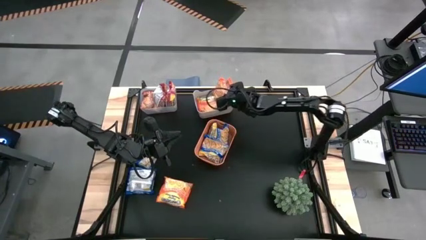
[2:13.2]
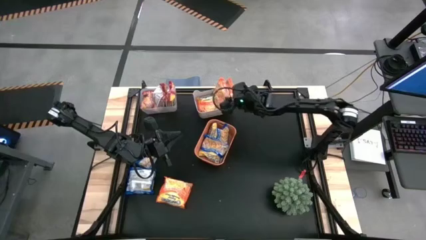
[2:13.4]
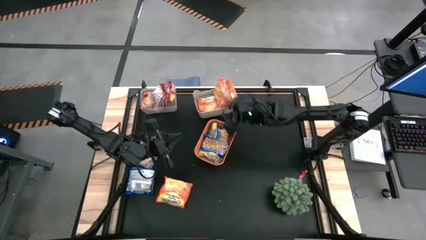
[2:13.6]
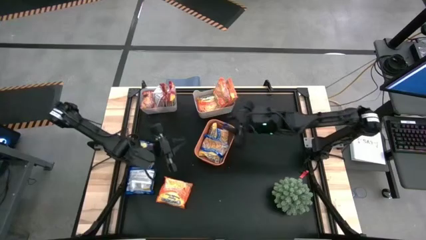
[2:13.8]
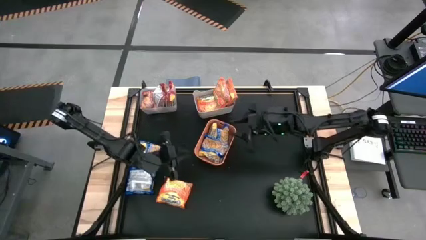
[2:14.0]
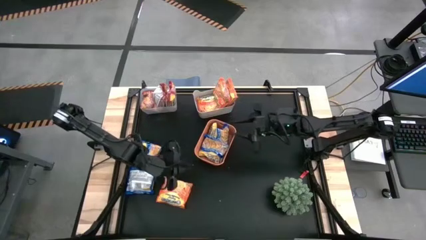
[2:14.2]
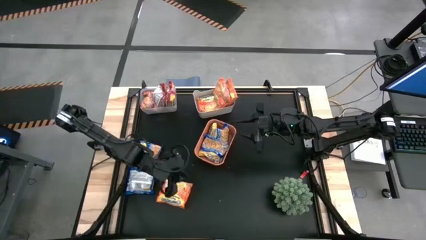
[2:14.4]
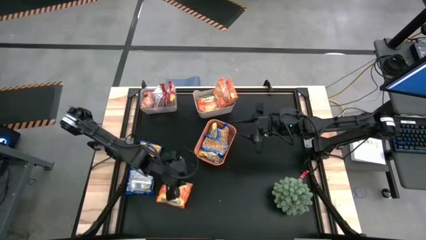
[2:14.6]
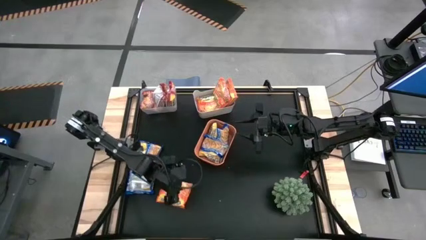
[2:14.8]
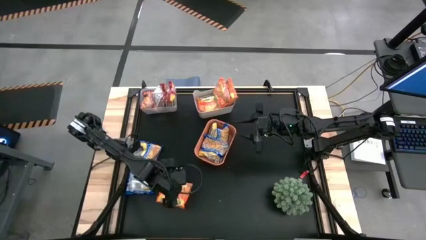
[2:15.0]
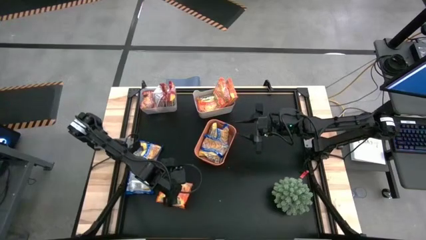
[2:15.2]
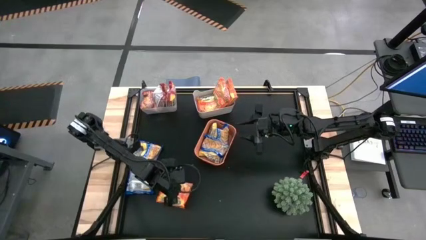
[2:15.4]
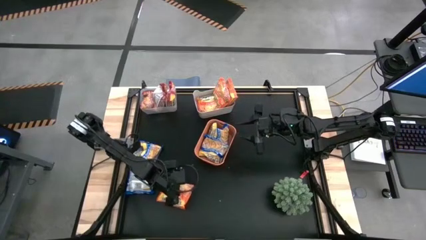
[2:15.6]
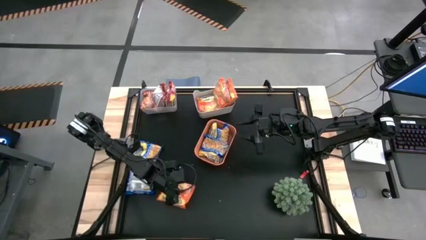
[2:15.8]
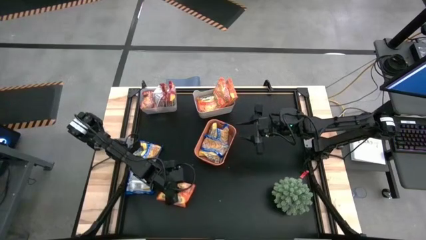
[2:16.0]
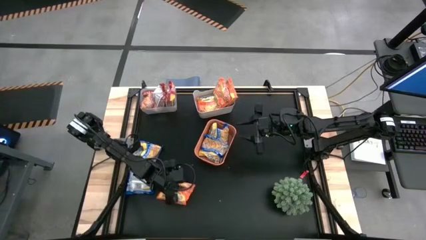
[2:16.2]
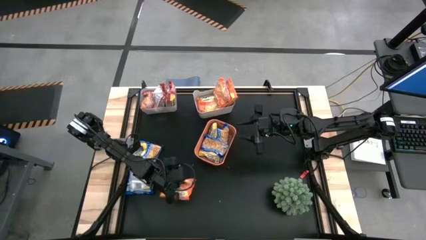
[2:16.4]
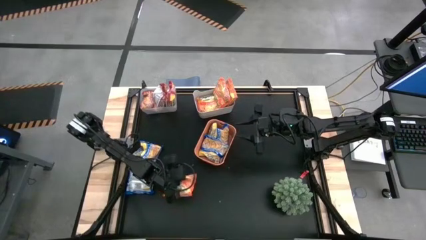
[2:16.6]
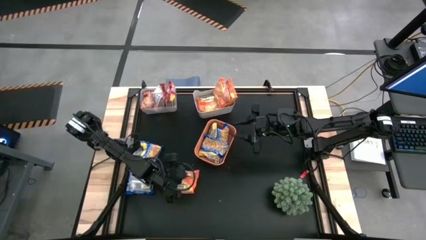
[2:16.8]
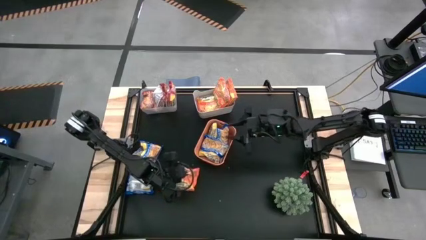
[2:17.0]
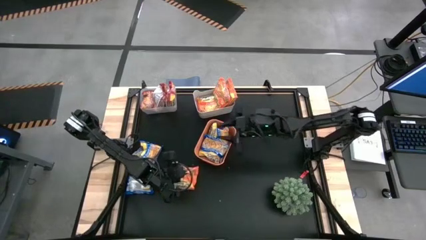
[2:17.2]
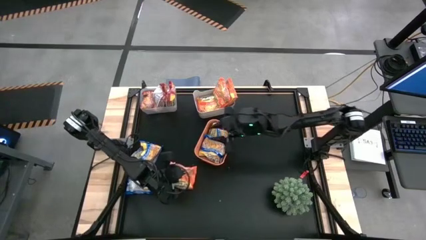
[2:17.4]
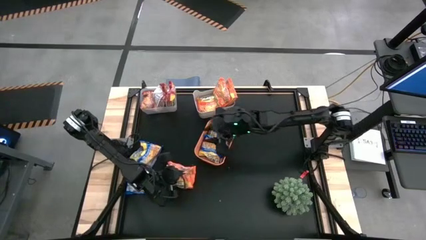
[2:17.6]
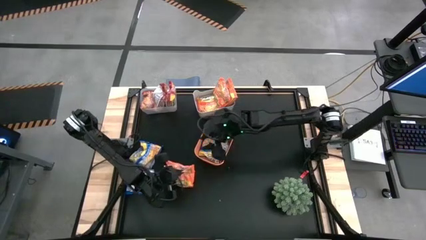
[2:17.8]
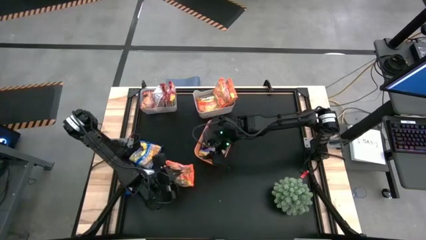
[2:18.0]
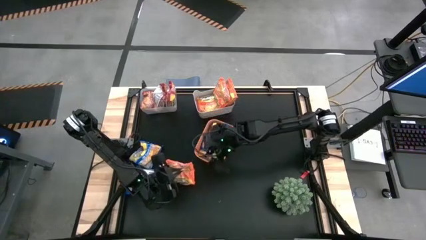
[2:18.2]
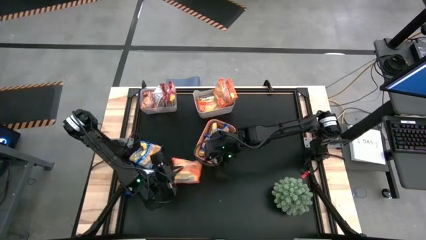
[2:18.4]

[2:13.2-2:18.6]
Task: Sort Maruchan noodles
Put the orange bag into the white bin

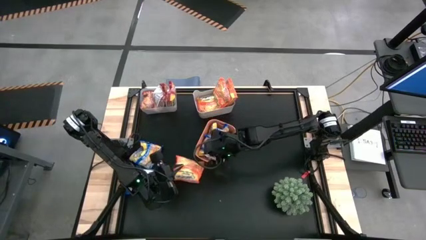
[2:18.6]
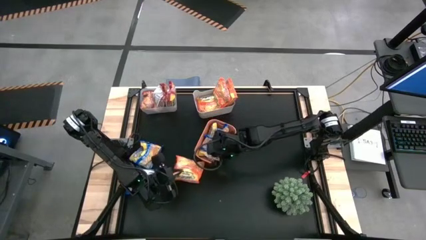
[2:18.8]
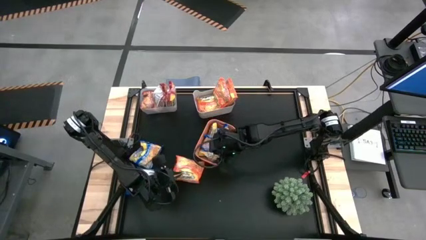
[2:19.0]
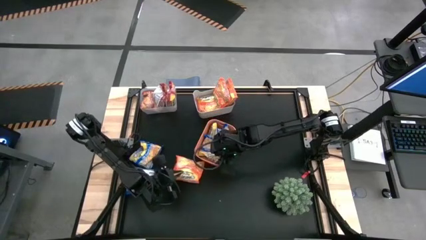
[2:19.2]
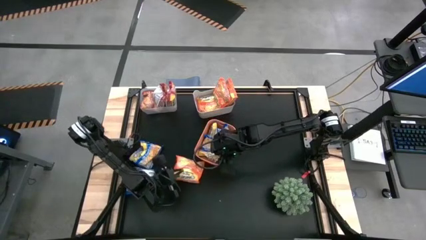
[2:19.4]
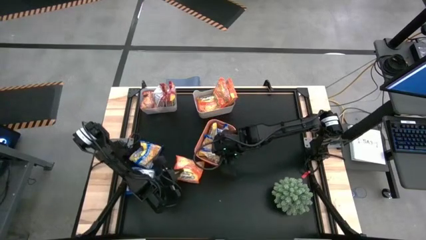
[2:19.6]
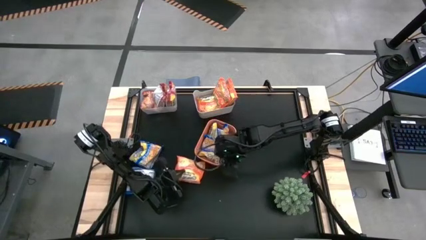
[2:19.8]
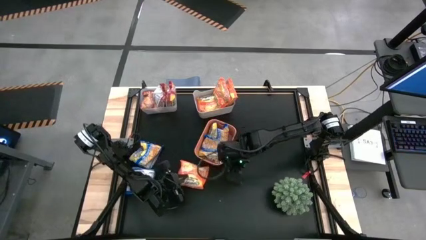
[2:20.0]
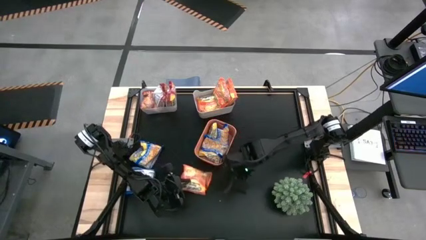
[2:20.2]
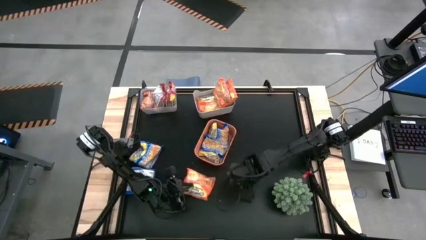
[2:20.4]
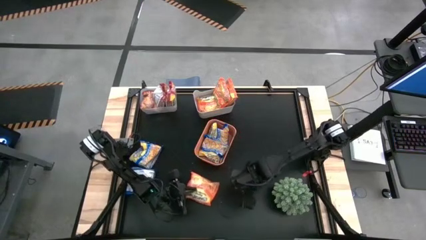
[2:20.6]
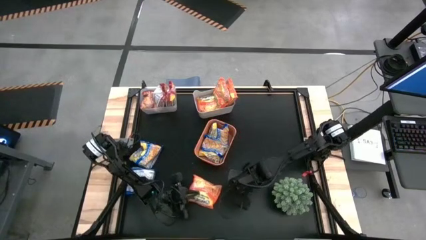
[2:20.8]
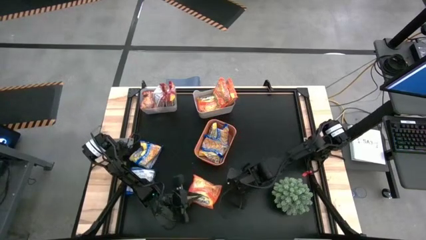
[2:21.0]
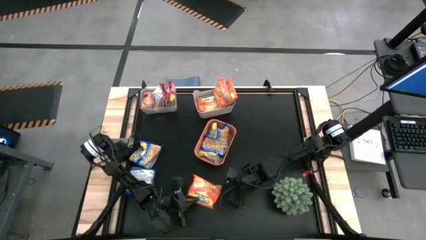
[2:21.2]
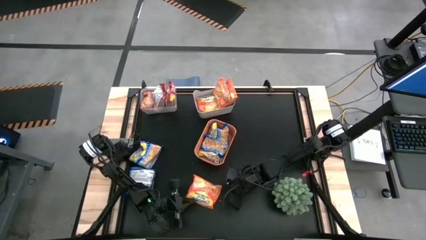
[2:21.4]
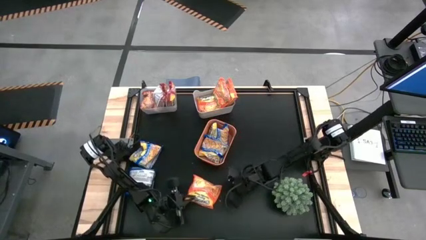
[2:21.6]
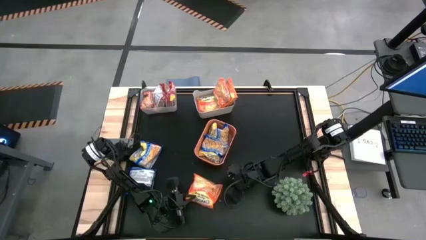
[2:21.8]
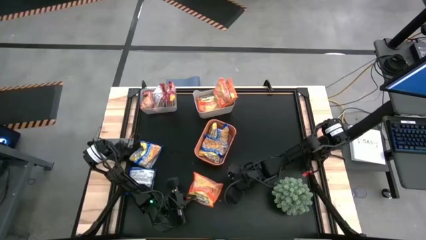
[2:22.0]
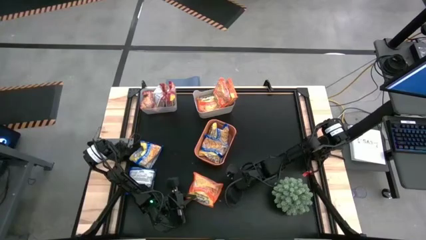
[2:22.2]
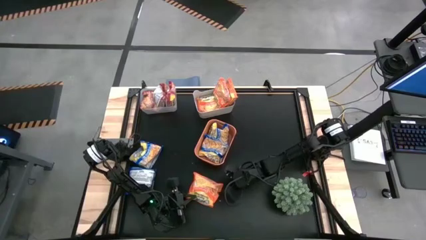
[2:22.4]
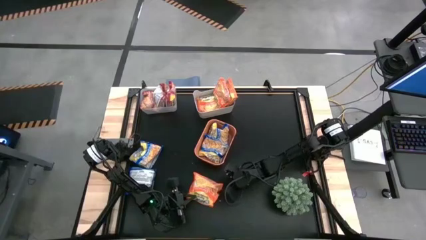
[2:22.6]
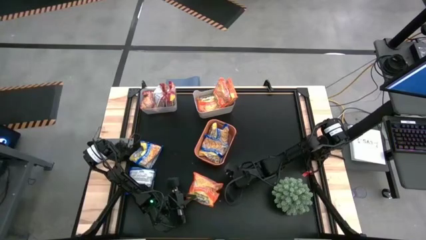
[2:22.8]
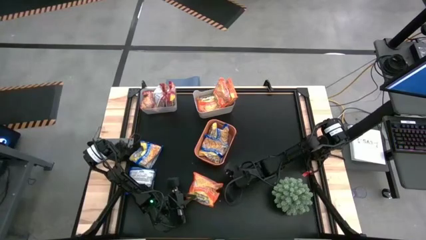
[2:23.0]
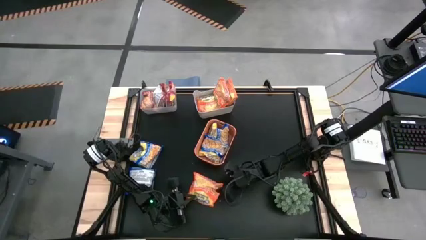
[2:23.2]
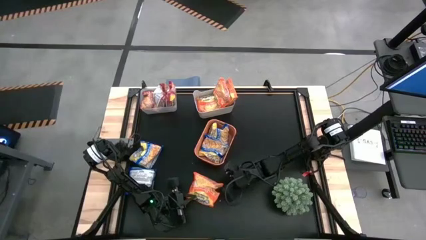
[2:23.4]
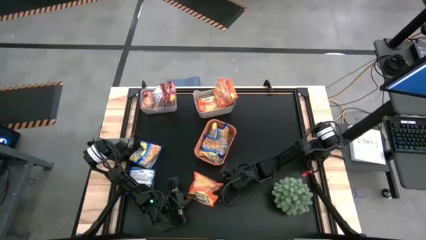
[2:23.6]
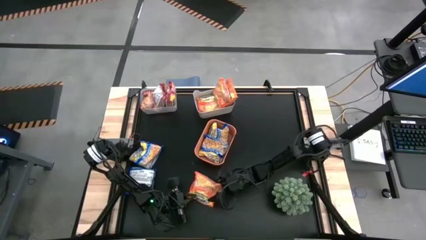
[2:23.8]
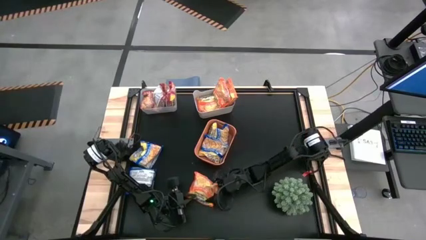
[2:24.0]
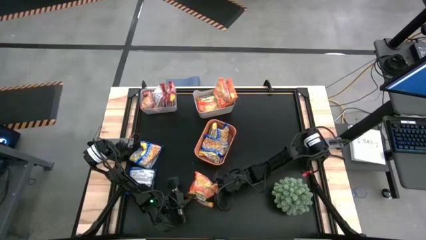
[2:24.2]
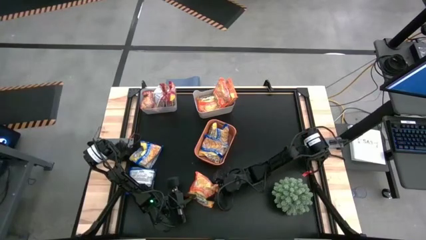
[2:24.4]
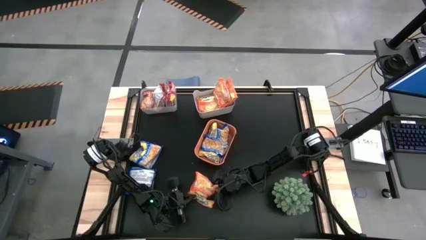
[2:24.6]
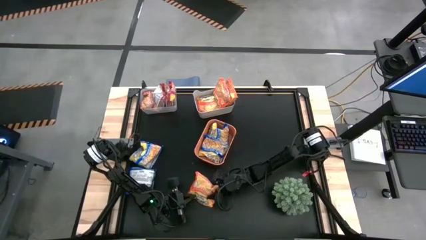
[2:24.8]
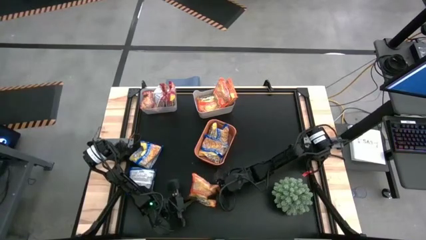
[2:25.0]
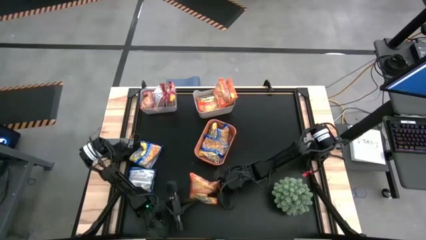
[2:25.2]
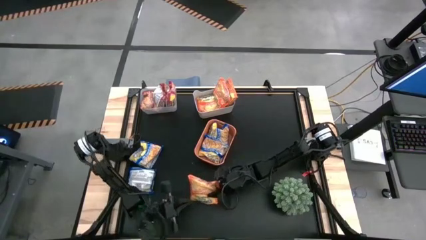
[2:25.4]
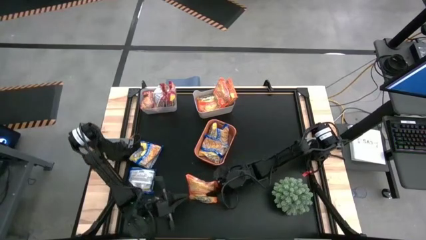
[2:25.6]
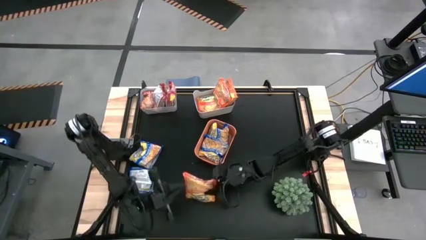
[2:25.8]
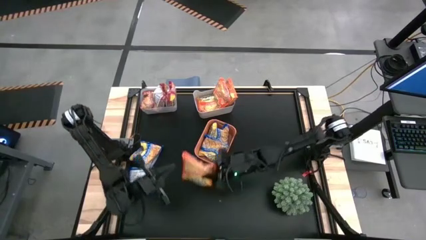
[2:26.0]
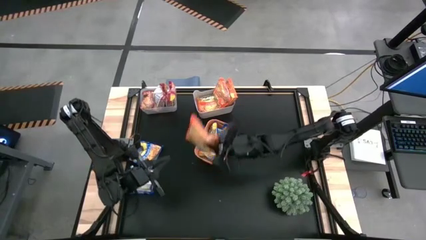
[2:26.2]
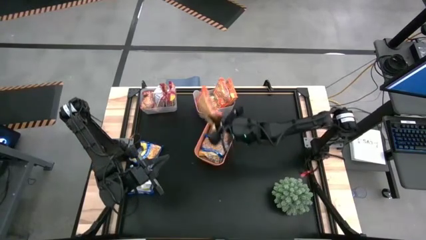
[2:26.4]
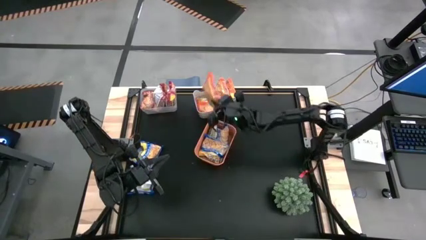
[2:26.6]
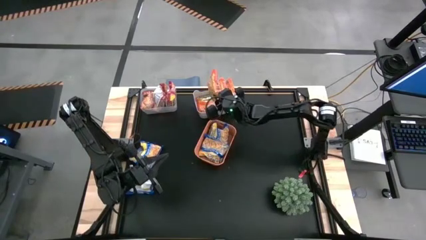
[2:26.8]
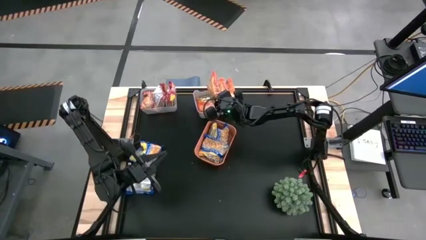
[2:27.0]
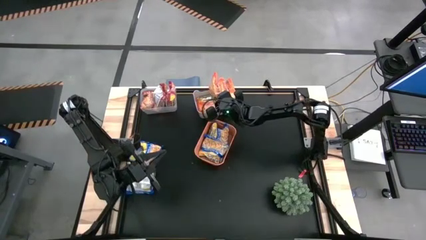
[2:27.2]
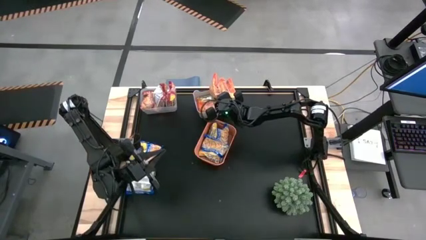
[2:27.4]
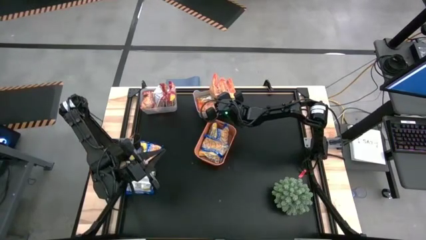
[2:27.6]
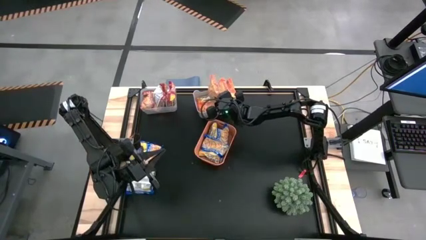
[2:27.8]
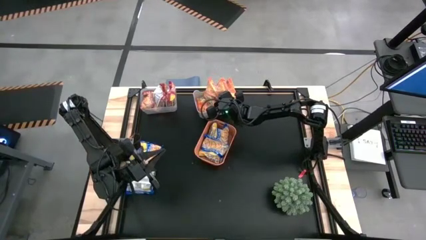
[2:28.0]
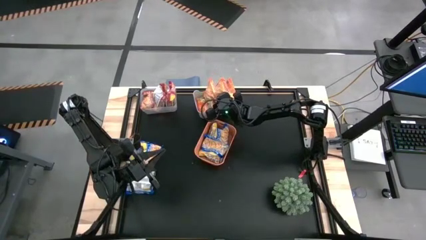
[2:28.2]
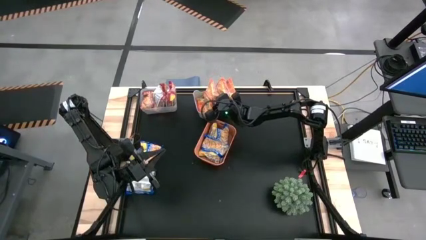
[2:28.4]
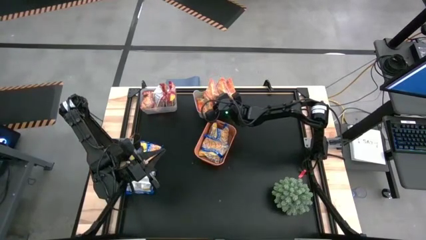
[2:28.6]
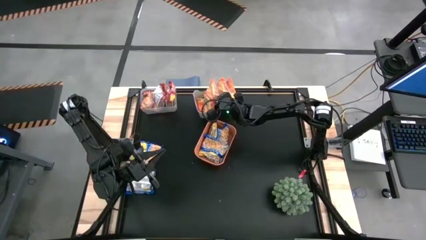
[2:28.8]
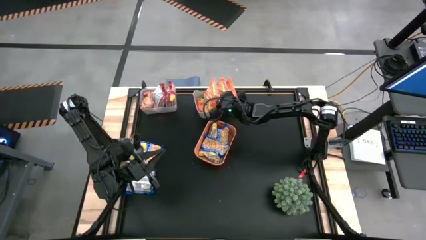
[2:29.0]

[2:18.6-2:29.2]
Put the orange bag into the white bin

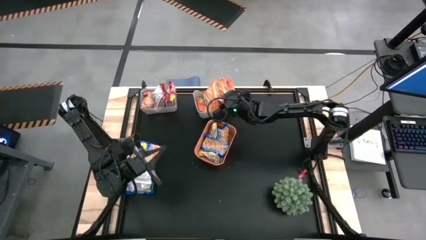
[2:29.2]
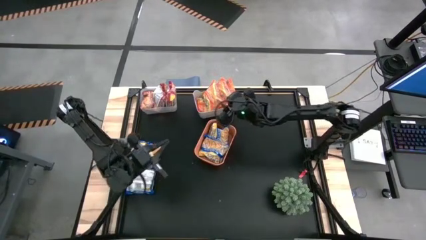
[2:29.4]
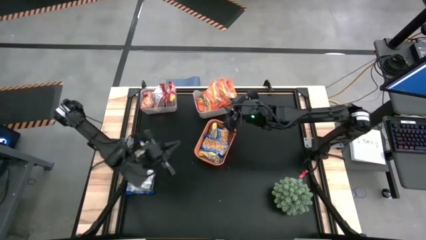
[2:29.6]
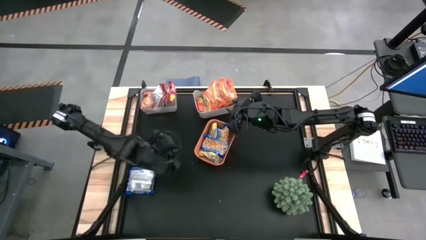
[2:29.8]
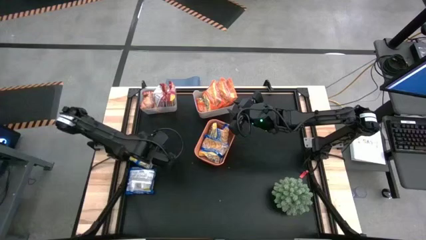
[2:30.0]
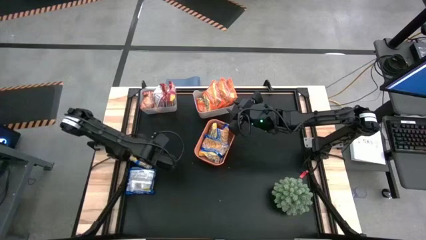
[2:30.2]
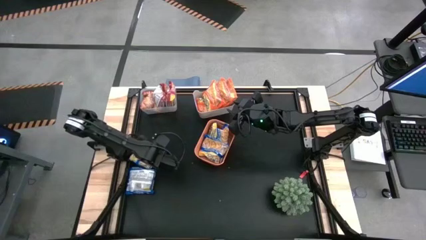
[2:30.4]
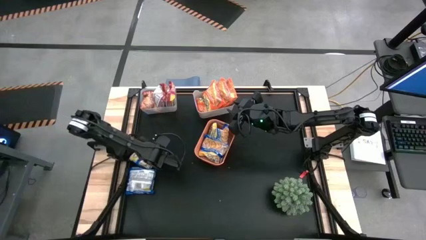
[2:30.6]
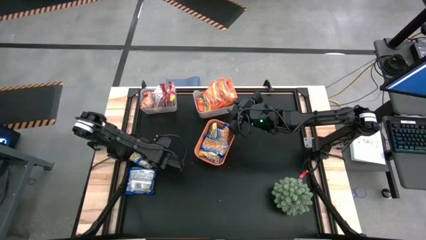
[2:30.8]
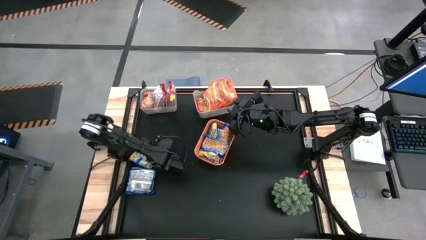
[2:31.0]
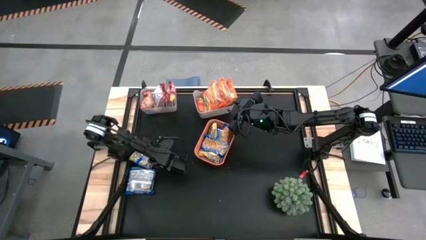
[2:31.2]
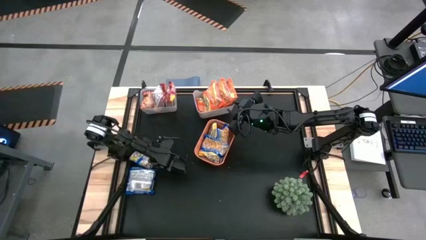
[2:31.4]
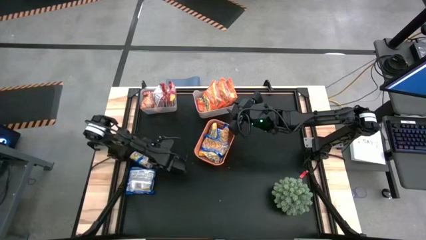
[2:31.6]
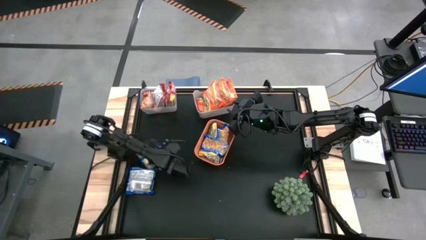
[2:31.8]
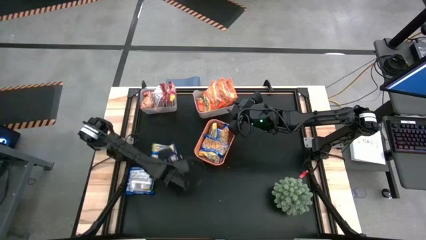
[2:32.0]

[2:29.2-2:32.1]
Put the blue bag into the orange bin
